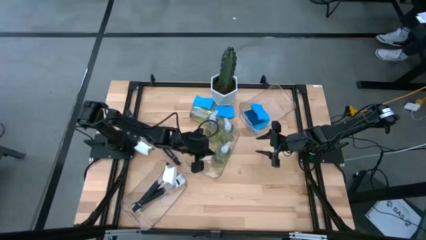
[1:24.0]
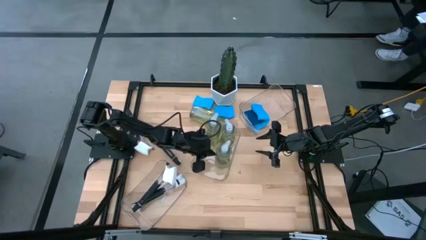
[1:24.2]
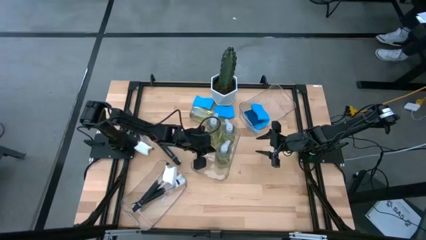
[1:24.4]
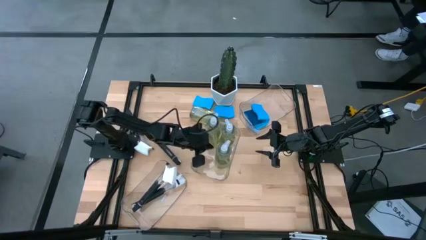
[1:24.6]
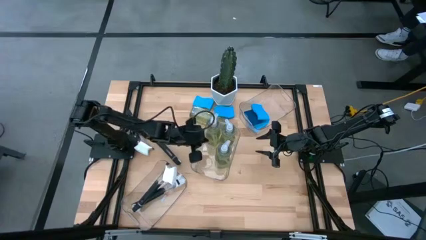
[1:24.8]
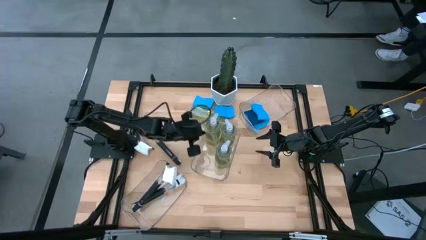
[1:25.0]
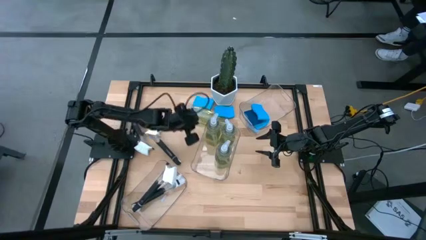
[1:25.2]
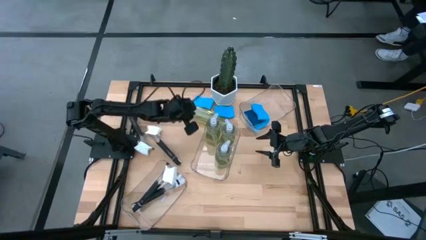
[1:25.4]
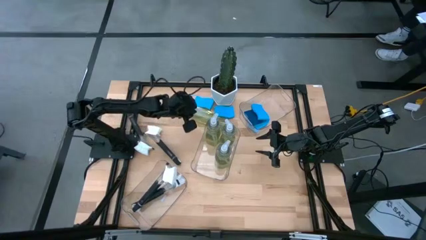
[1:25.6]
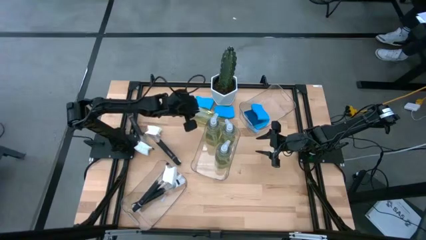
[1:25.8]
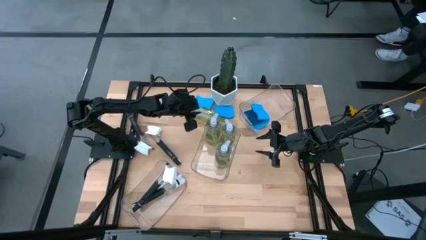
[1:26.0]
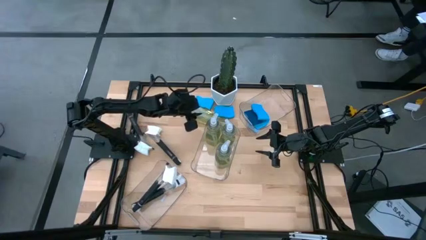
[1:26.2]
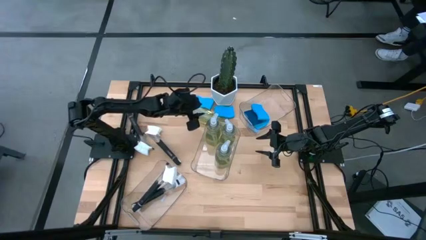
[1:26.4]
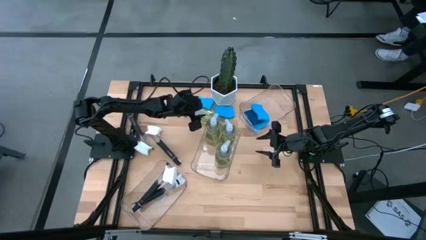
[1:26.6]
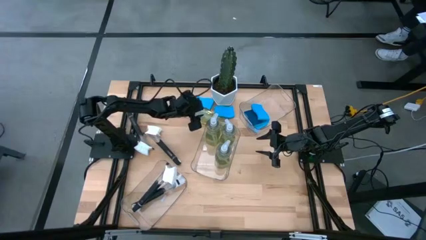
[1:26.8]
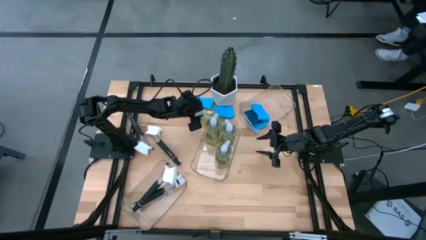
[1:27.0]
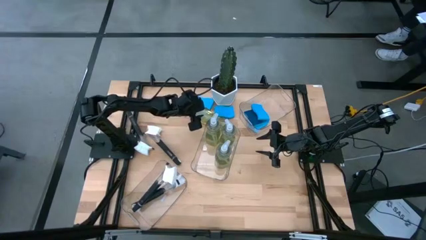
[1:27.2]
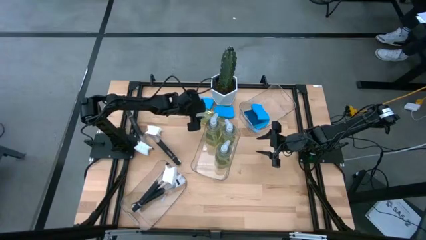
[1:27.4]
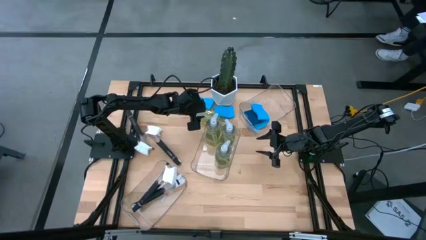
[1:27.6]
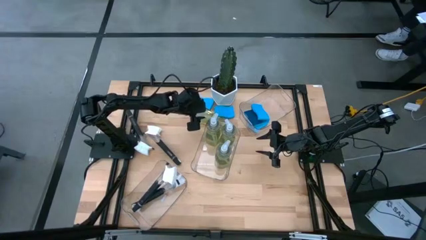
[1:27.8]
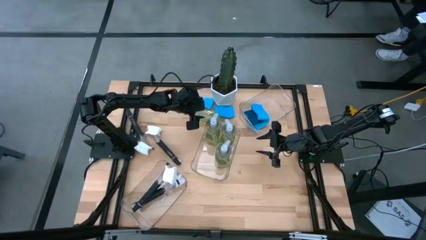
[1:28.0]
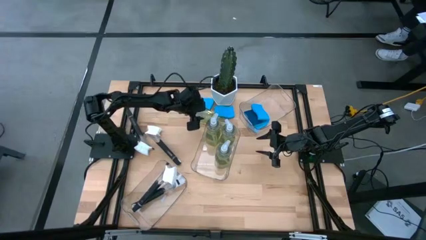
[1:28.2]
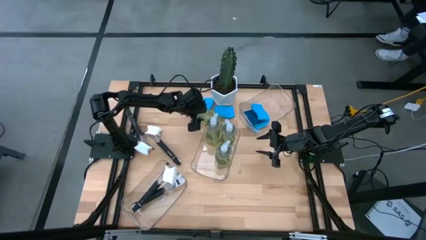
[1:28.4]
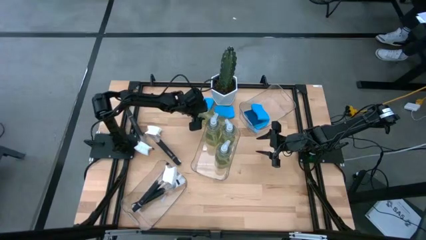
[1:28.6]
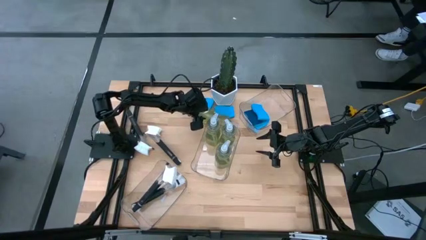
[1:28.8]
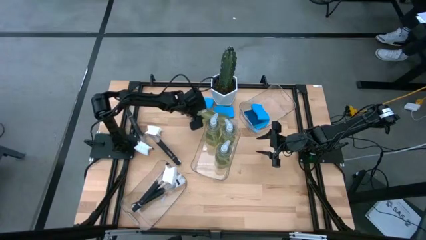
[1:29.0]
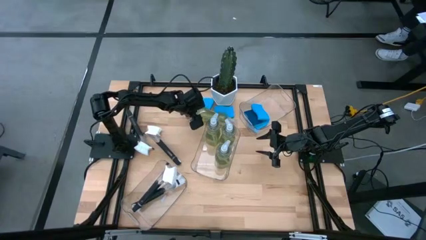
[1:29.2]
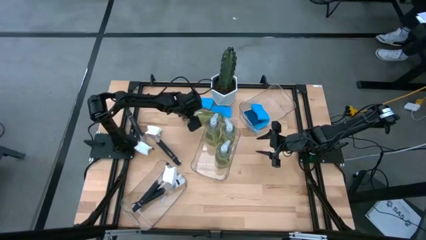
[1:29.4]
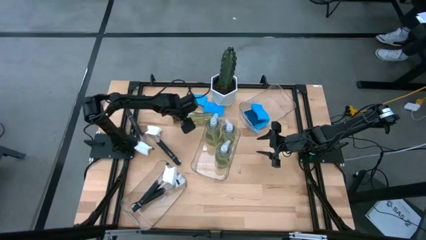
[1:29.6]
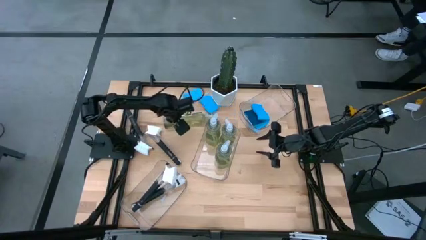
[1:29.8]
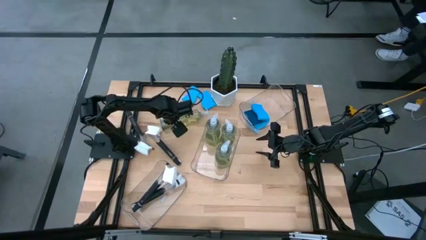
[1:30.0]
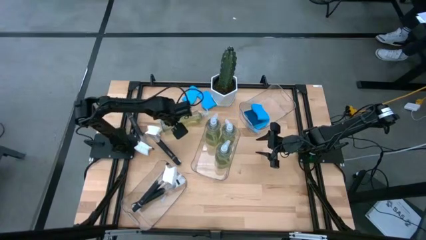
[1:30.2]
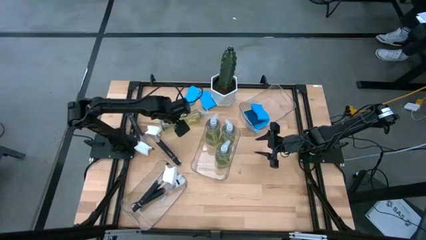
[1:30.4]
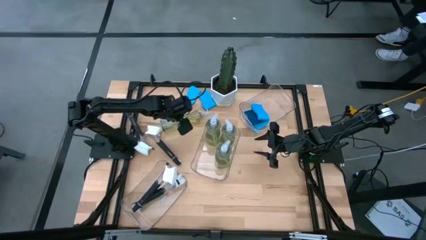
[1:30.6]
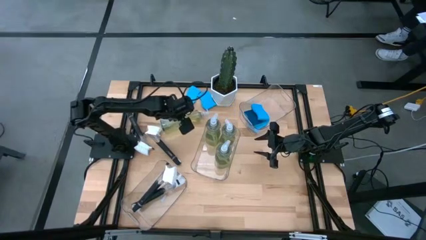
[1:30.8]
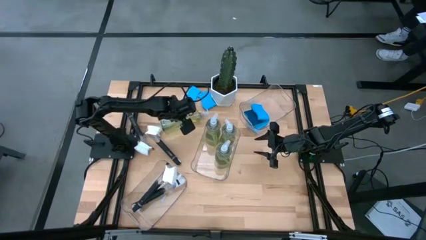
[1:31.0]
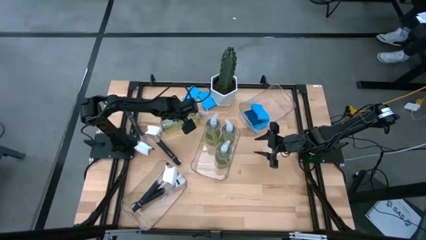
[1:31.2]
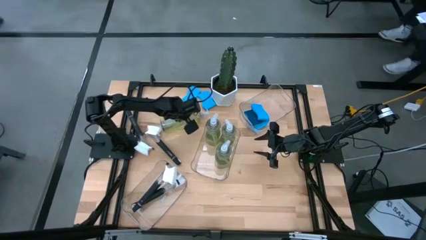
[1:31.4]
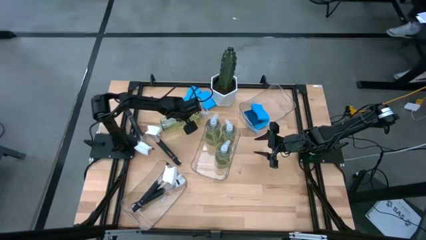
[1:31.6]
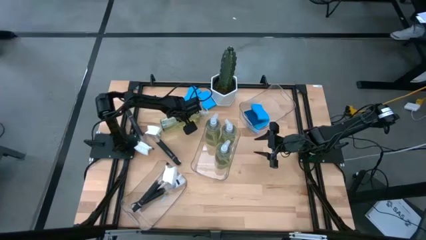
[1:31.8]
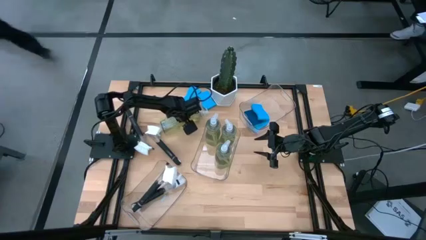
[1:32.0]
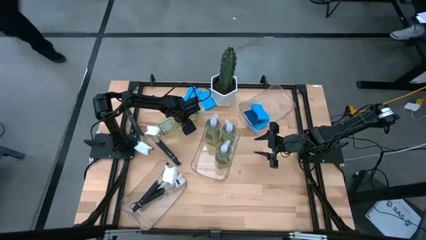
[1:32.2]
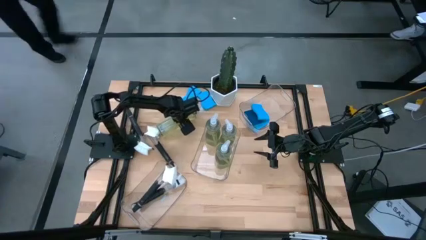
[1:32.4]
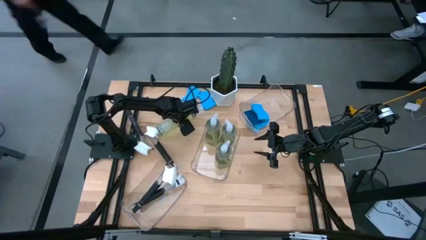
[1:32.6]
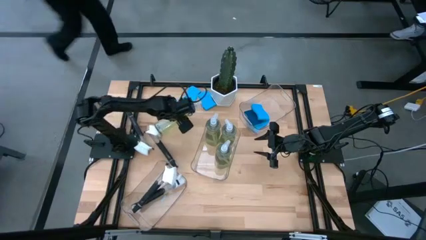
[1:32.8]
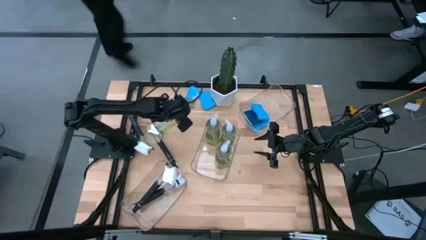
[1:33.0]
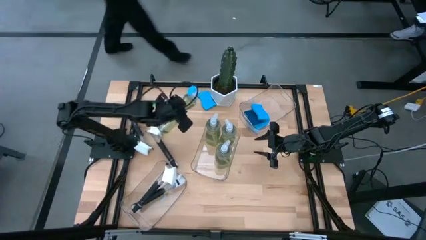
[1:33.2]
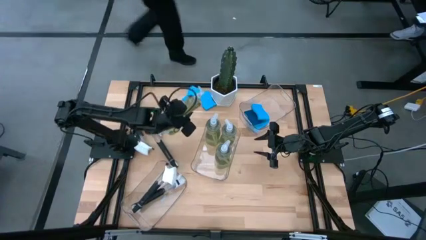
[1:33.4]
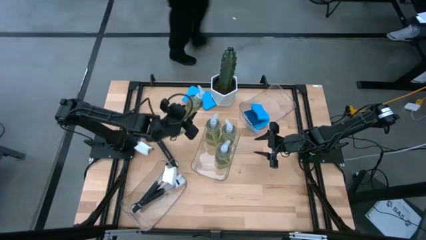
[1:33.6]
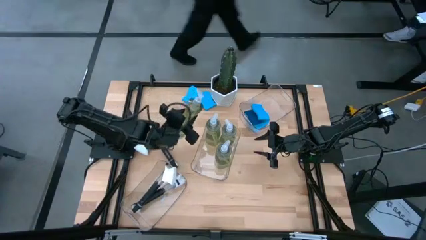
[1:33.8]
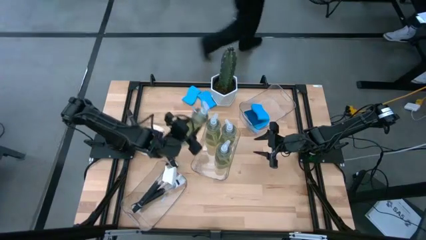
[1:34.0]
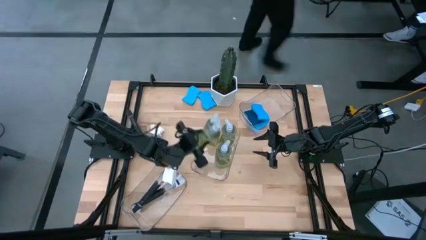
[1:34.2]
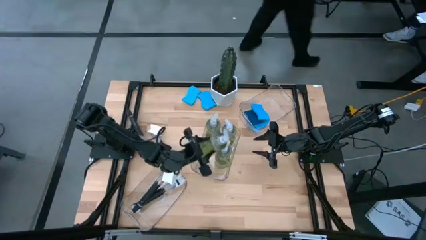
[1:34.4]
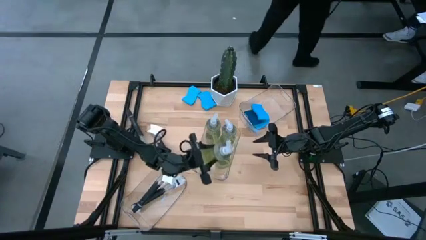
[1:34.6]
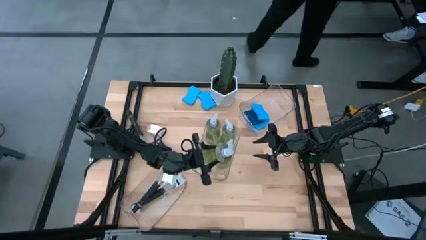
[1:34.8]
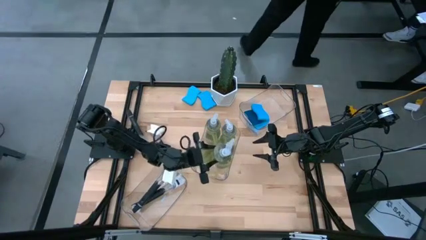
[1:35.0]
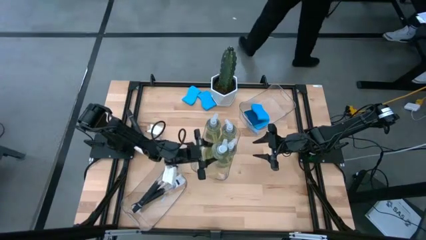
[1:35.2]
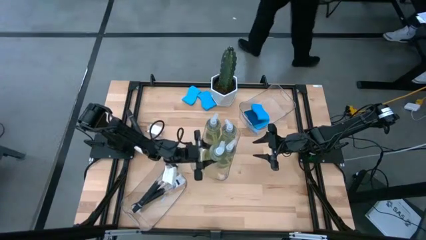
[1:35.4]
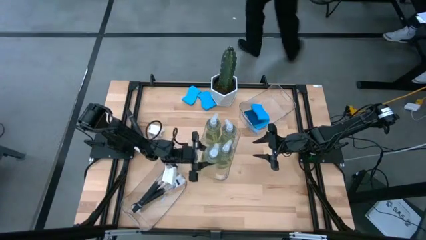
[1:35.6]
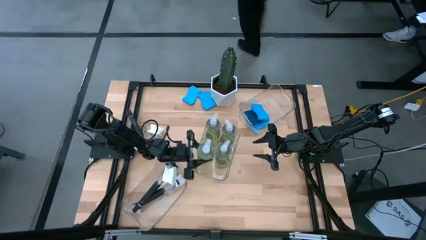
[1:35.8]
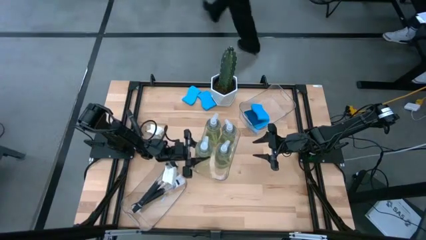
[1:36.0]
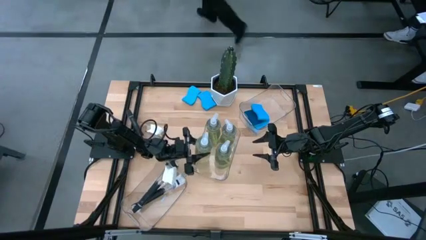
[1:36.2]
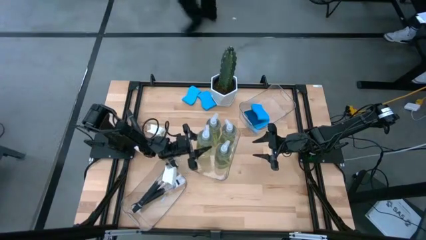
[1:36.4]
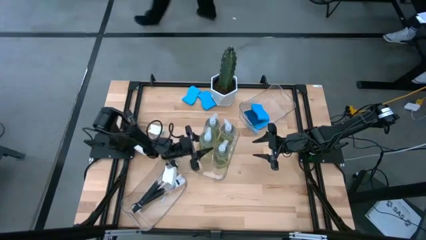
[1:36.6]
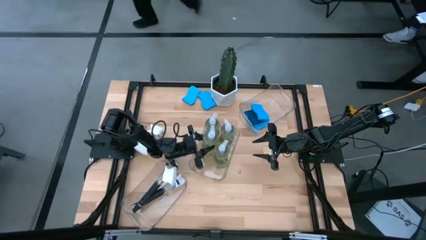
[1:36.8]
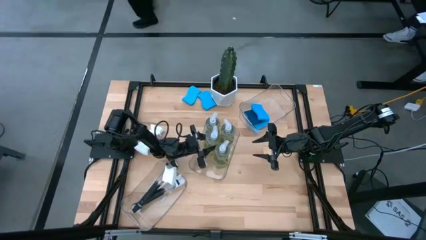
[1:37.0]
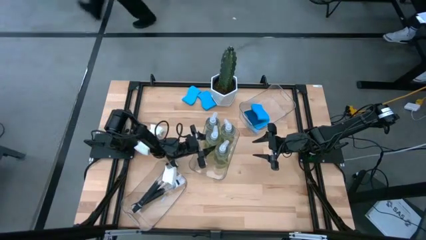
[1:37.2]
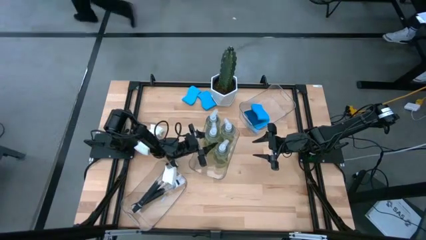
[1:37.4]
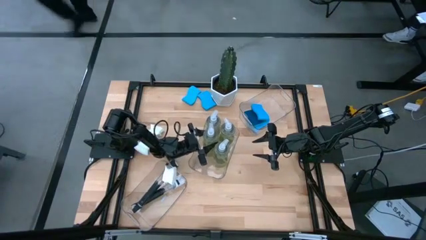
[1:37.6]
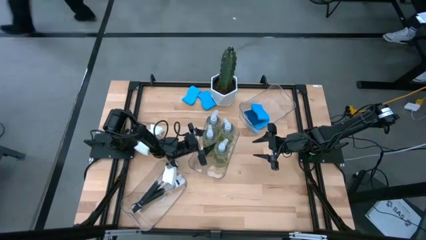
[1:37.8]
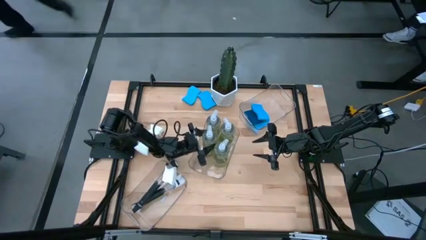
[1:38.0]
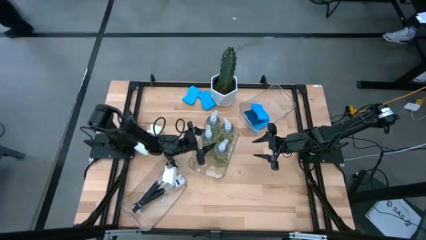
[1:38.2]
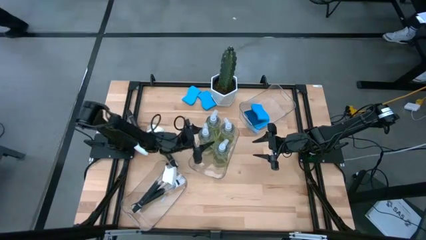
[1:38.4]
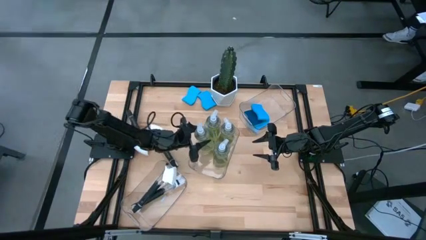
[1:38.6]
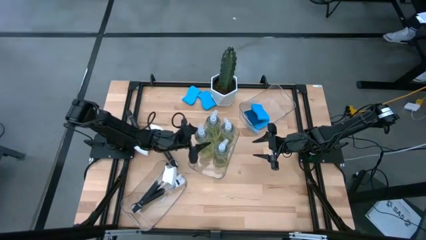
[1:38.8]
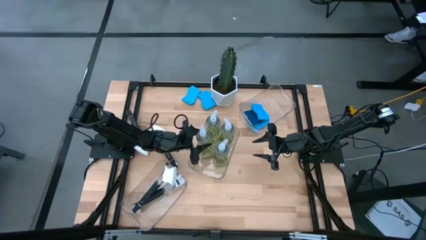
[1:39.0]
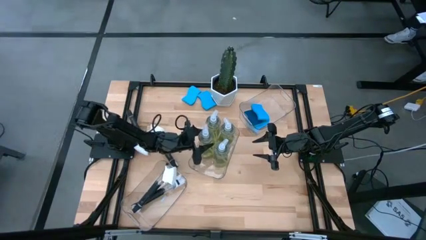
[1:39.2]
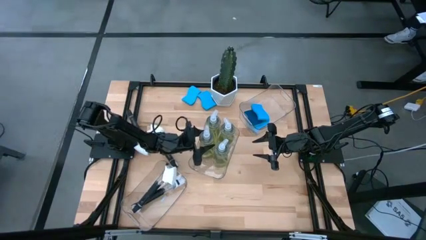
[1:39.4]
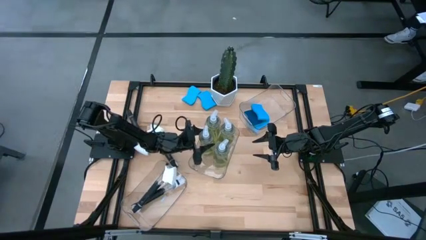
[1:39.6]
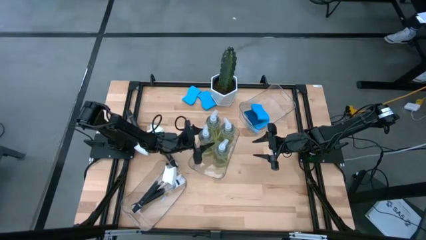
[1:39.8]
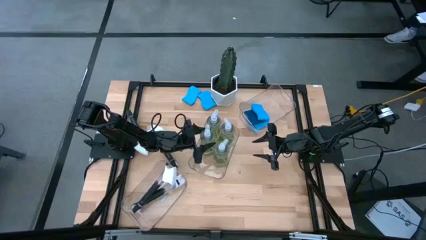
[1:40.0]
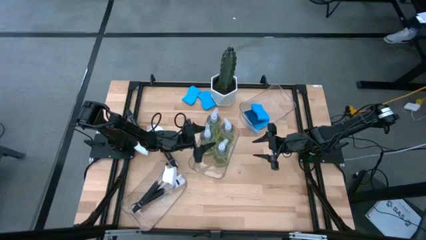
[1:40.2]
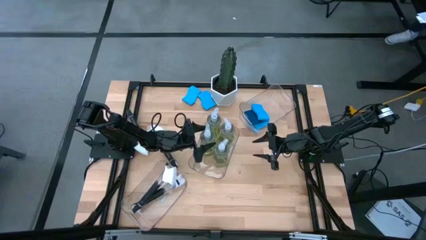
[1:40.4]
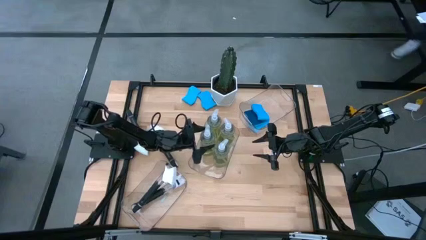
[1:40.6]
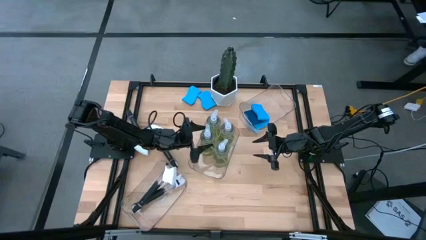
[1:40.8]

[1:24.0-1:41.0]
Task: Pick & Place Kitchen Sink Supplies
Put the green soap dispenser into the middle transparent bin
